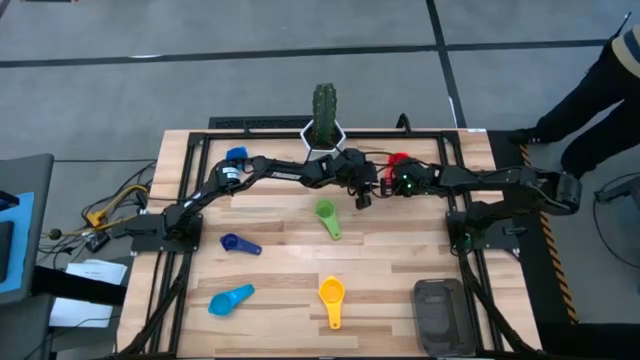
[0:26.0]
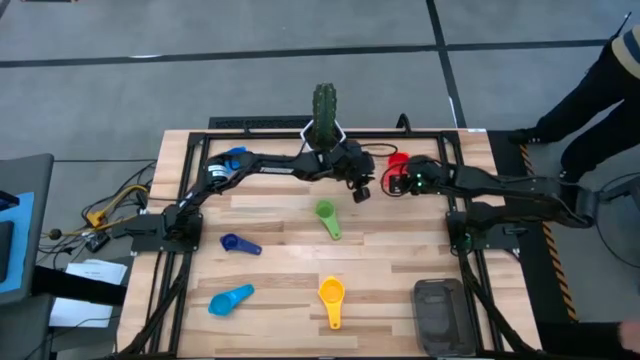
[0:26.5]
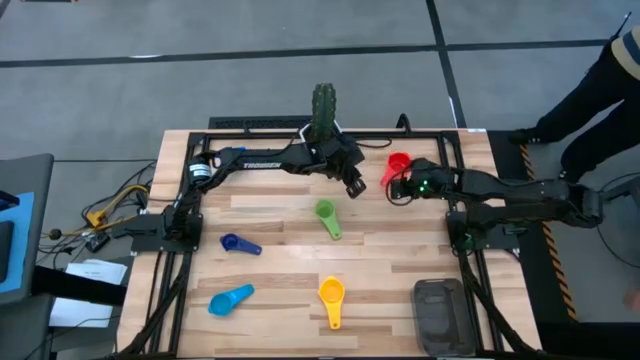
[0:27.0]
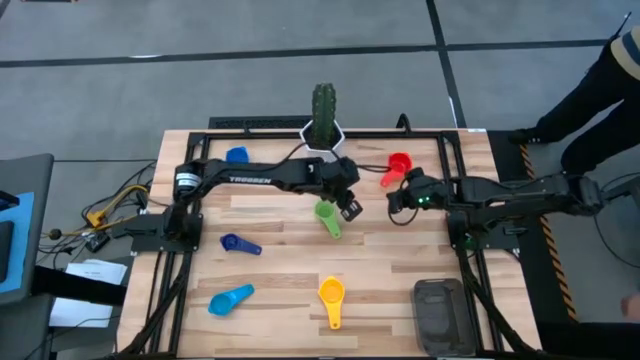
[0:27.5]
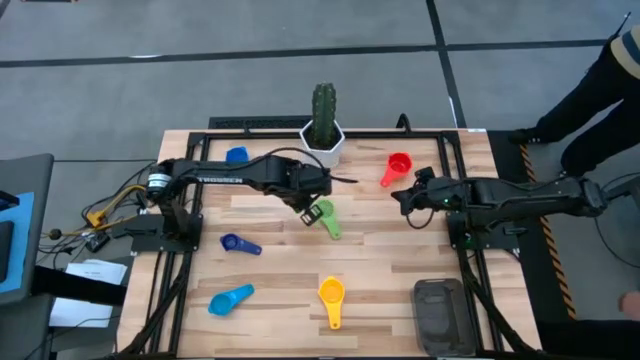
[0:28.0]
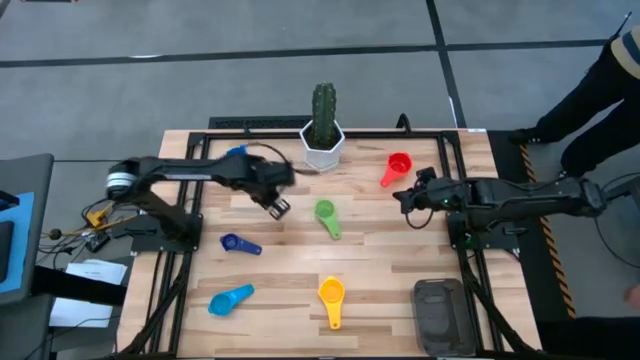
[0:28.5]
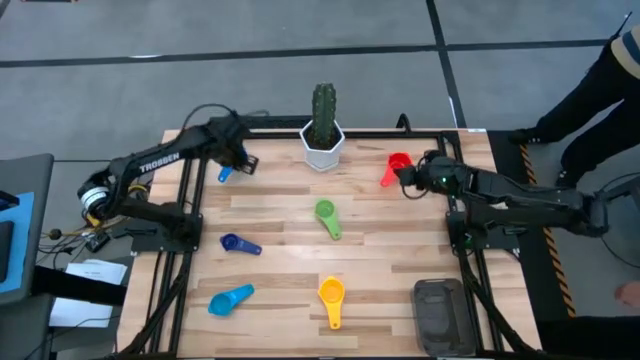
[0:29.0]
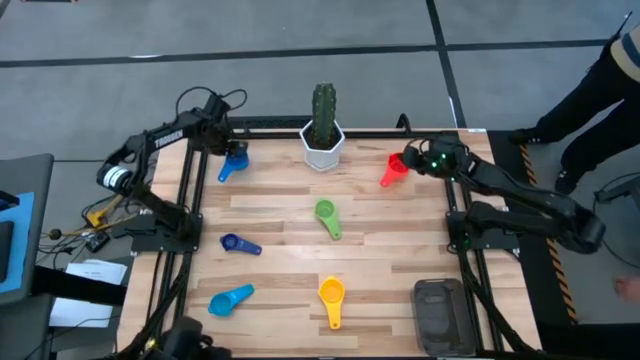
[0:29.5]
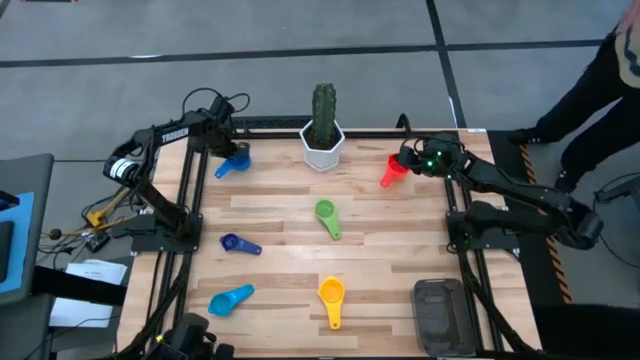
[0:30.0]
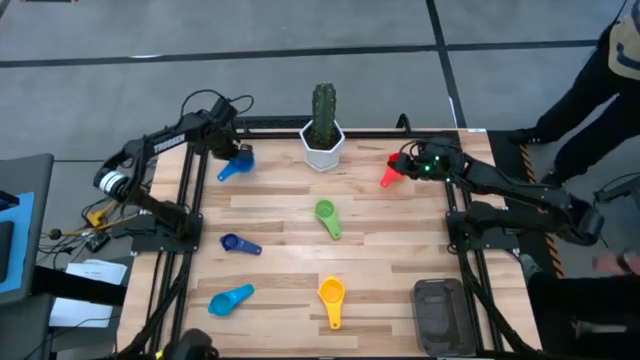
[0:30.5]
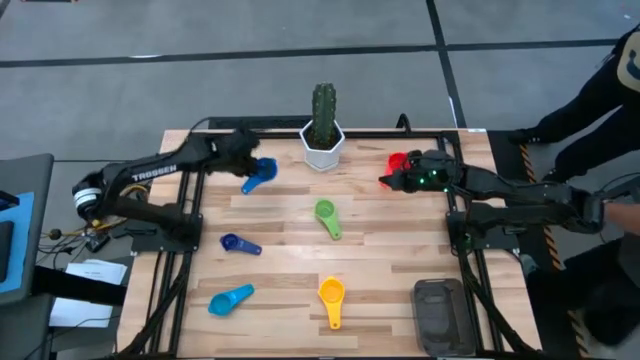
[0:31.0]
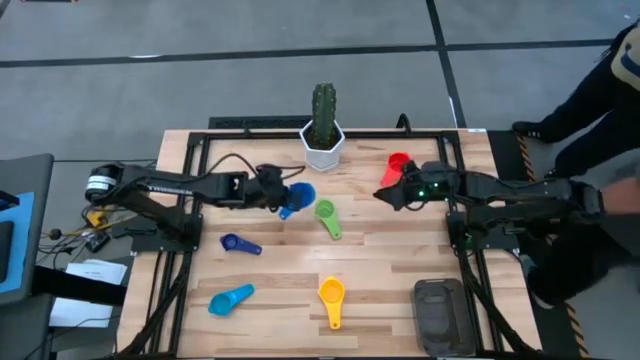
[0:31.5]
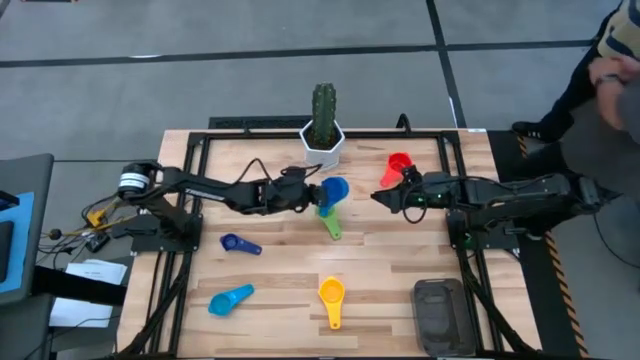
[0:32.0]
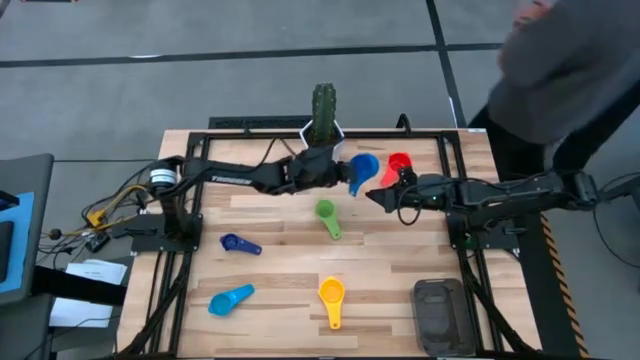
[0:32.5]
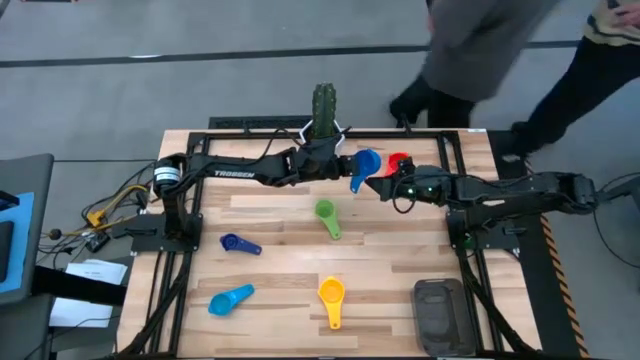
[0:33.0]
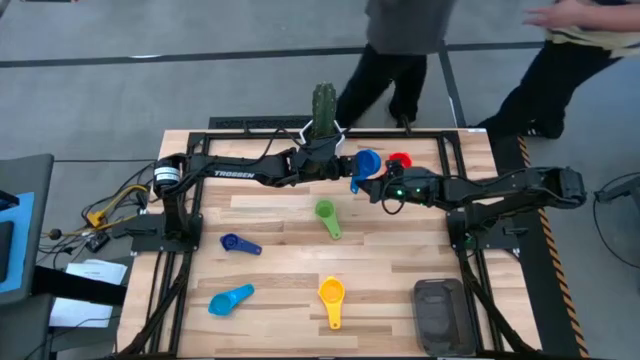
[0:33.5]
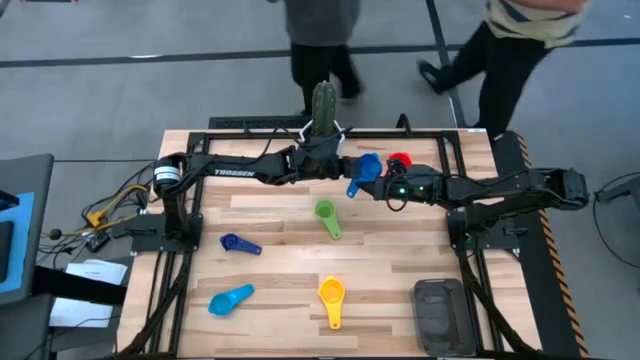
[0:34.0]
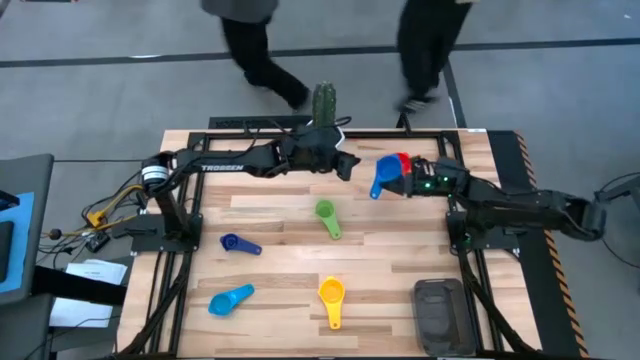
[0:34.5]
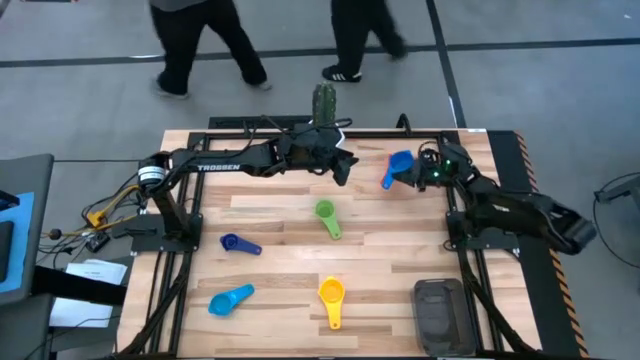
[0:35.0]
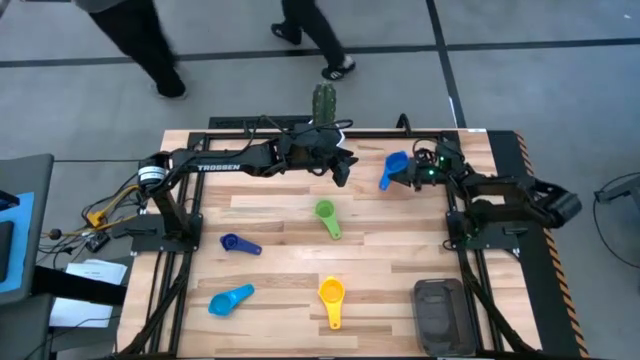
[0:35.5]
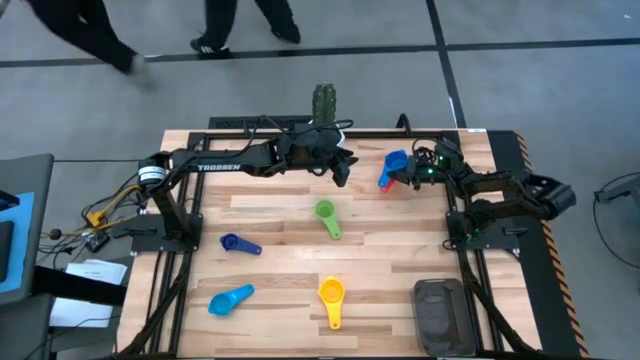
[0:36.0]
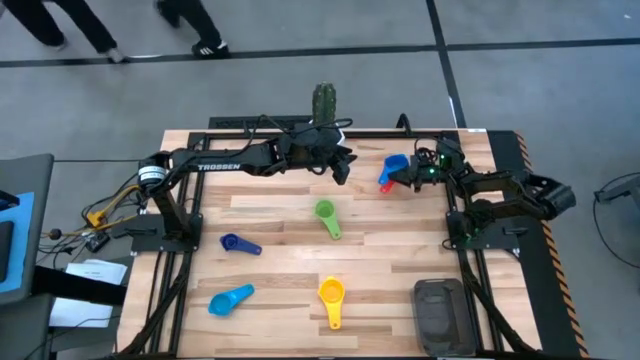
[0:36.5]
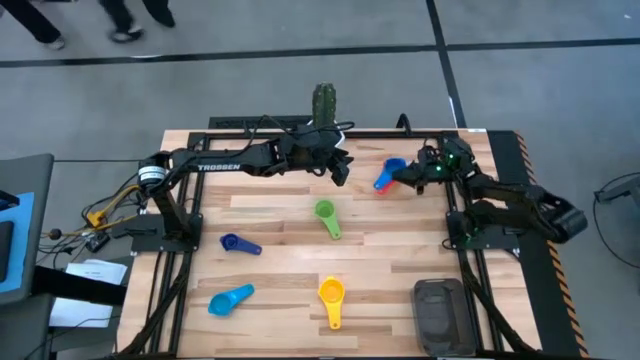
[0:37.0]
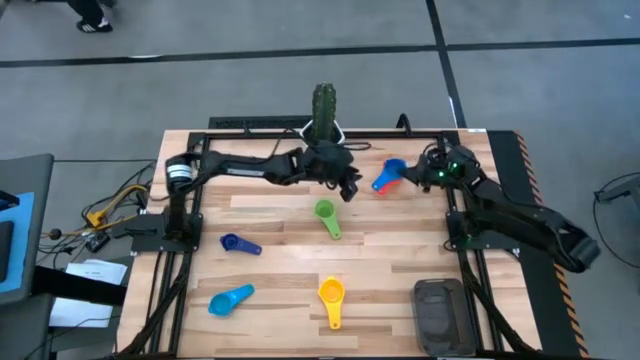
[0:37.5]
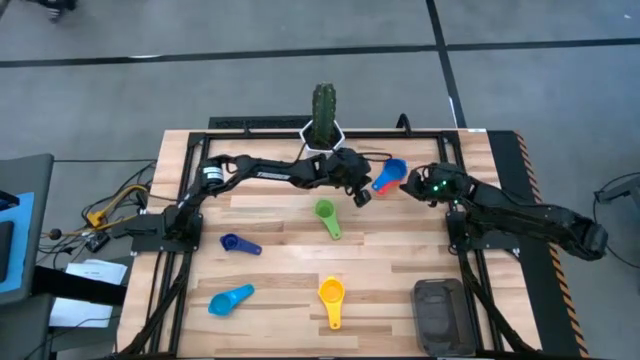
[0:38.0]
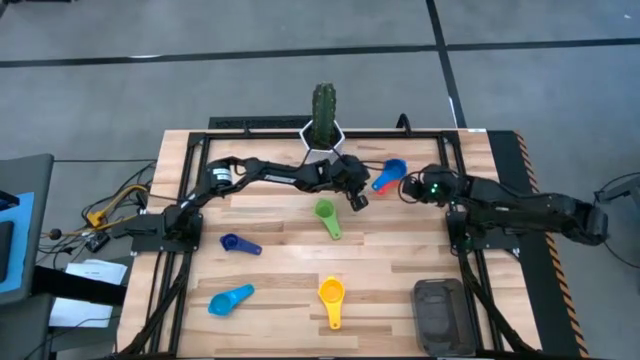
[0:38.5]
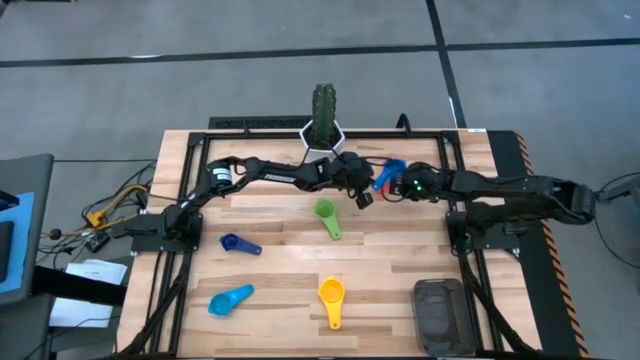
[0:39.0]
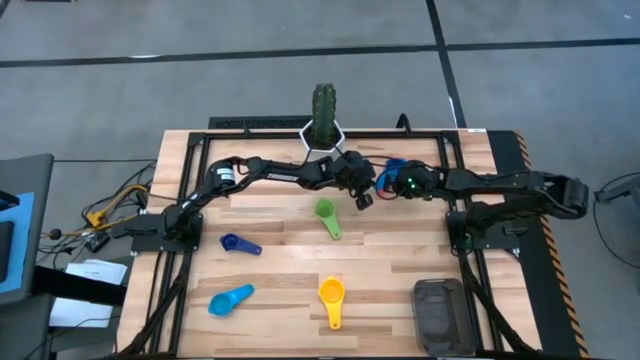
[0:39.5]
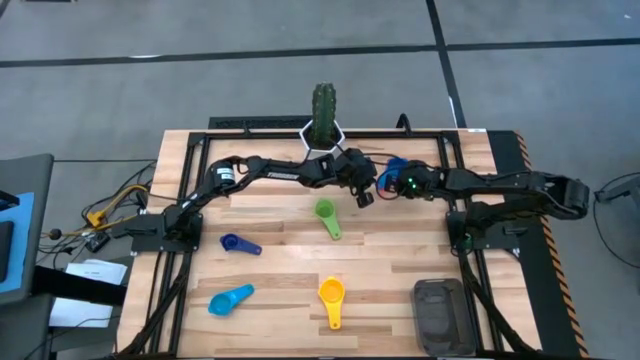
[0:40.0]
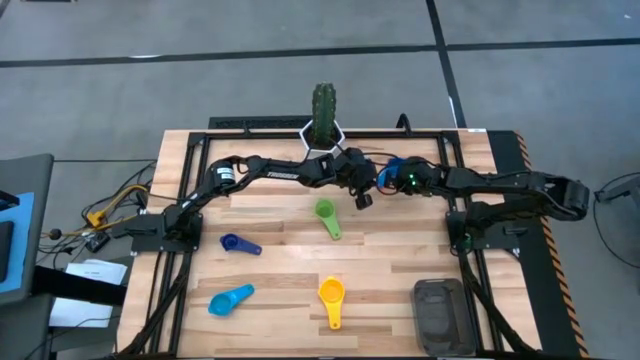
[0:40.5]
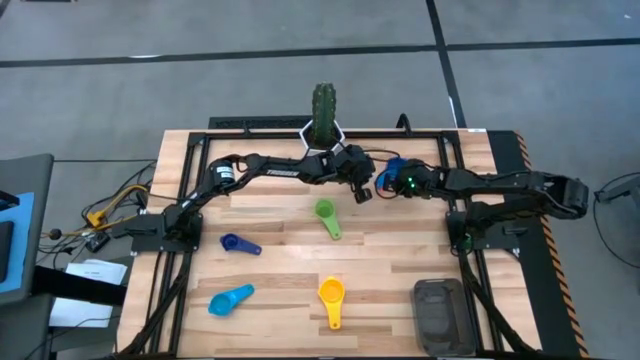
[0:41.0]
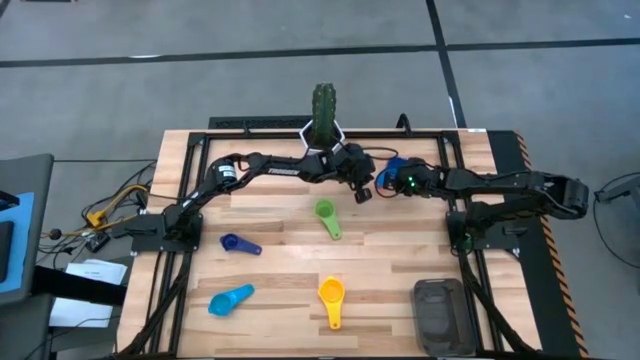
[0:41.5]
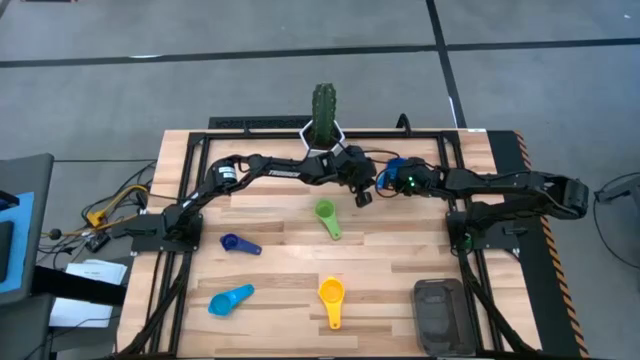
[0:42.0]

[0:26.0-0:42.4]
Task: Nest measuring cups in basket
Stack the blue measuring cup on top of the red measuring cup

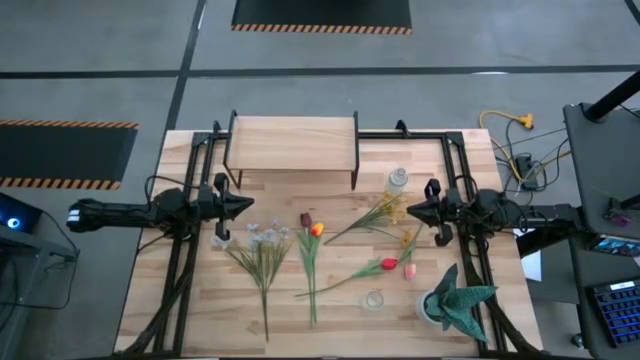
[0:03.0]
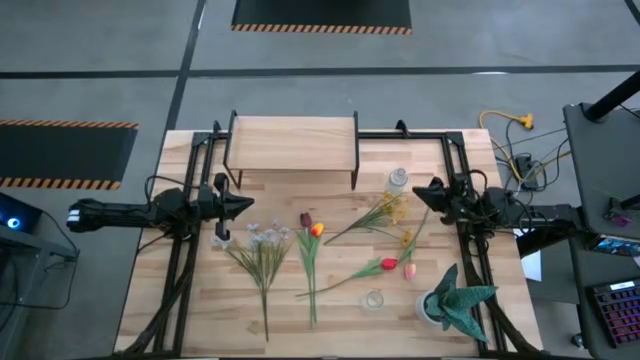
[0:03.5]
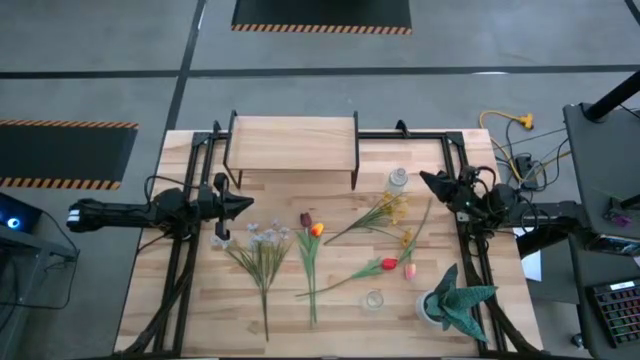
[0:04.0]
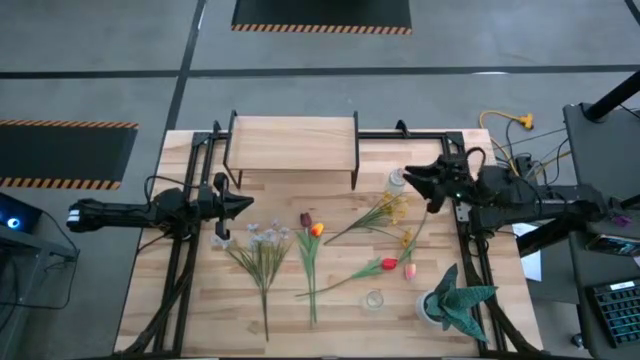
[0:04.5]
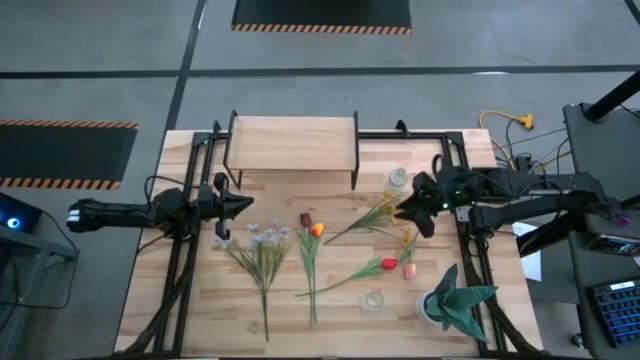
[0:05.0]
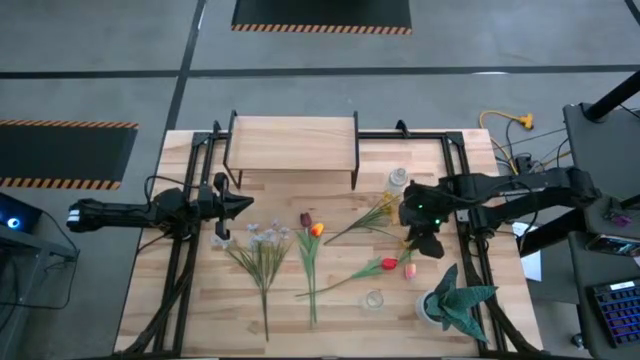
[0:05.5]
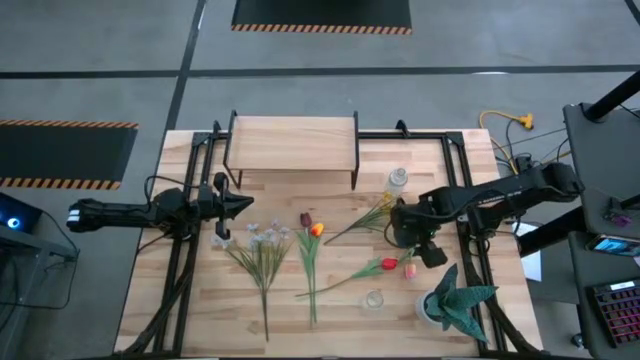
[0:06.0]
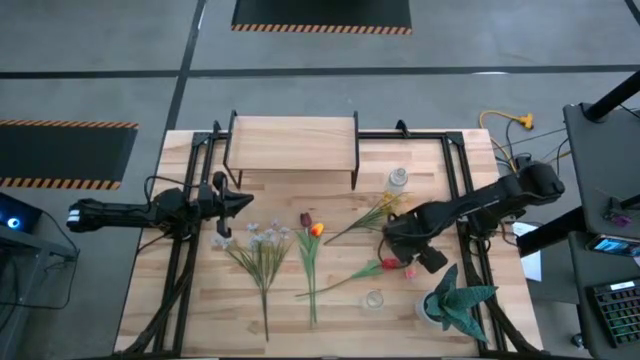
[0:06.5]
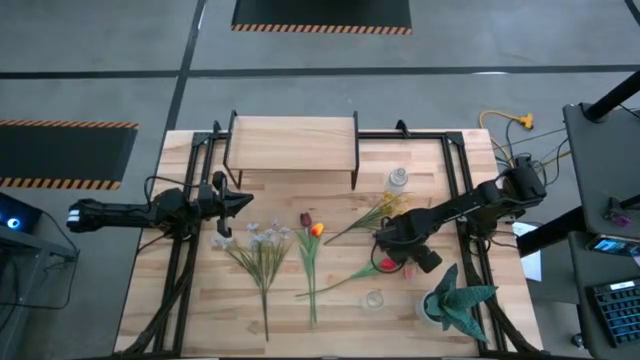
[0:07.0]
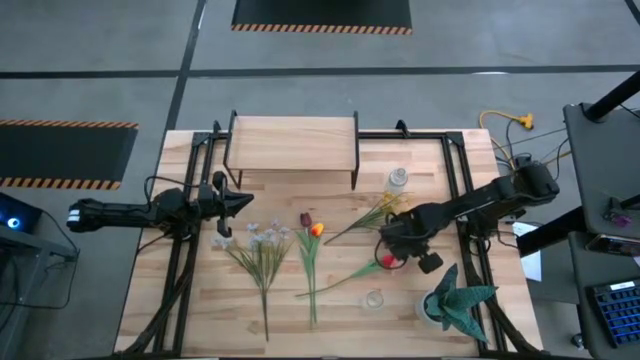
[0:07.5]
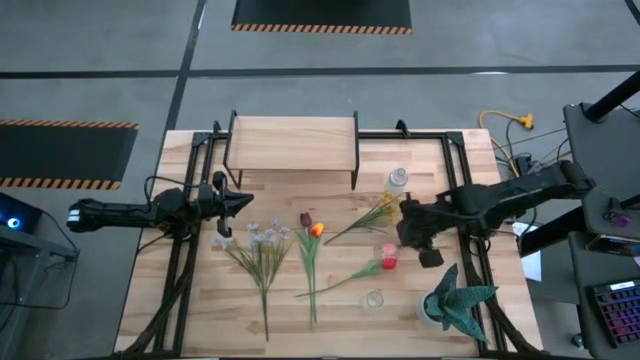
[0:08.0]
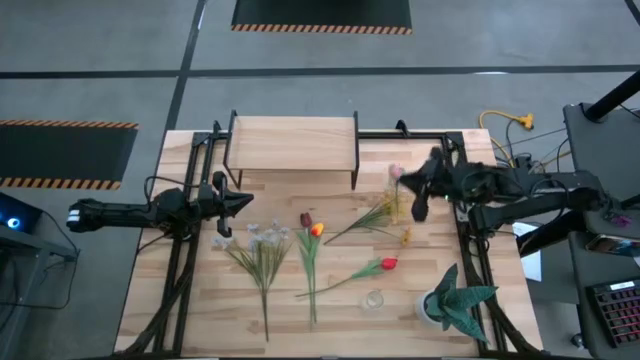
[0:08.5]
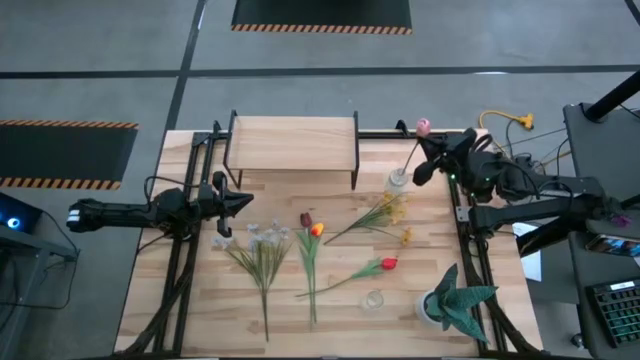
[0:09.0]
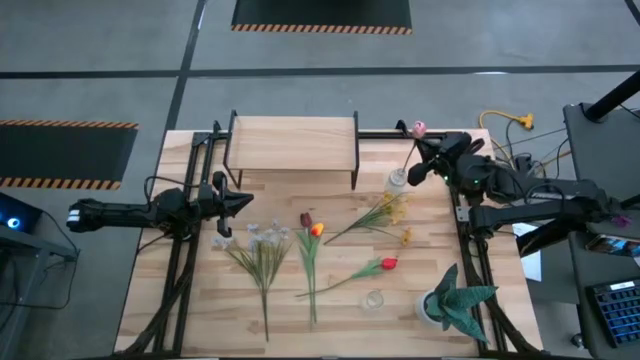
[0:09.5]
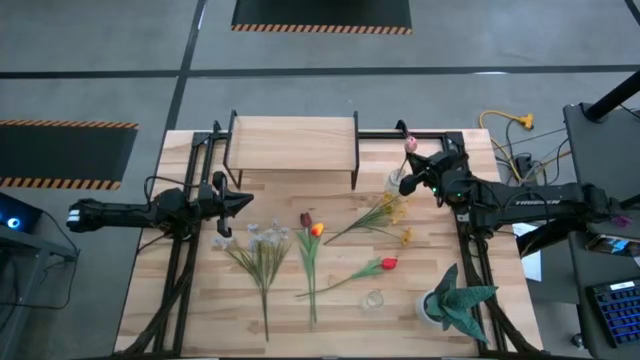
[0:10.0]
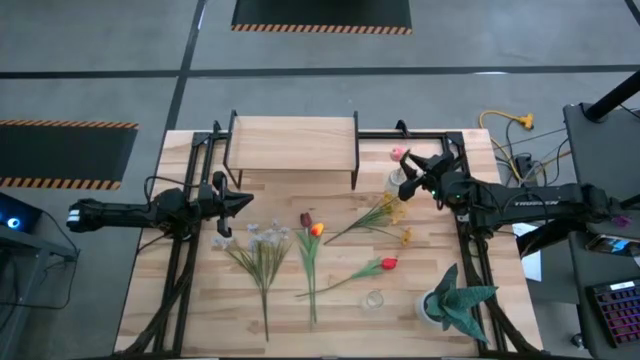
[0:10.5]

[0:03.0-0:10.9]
Task: Pick and place flowers into a vace then onto a shelf
Put the pink tulip into the top transparent vase
